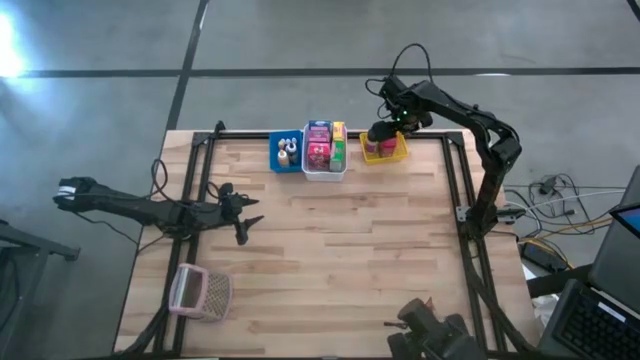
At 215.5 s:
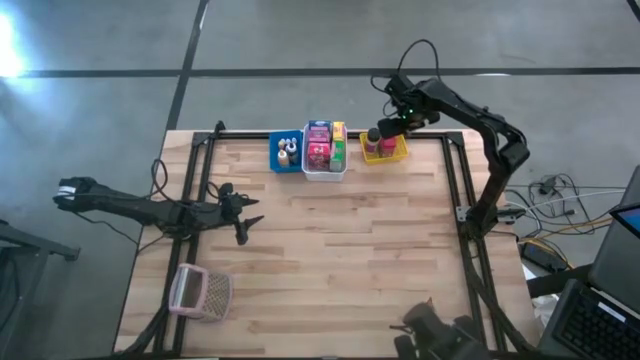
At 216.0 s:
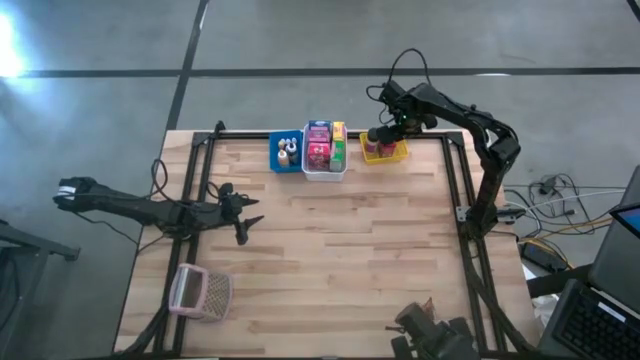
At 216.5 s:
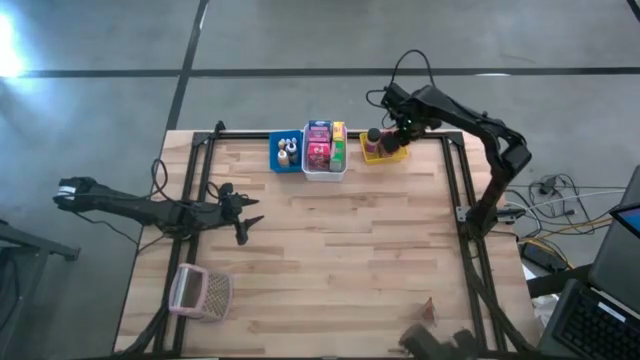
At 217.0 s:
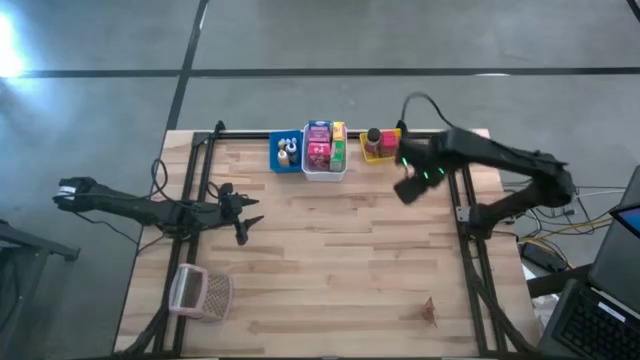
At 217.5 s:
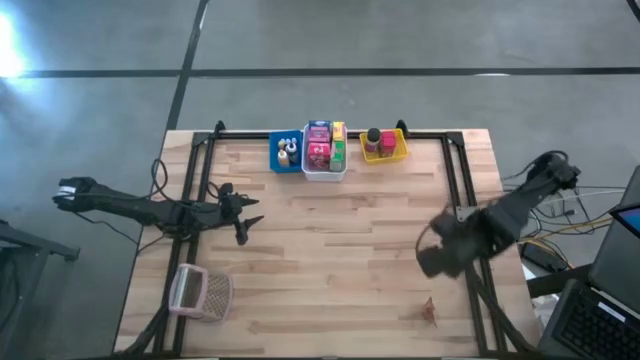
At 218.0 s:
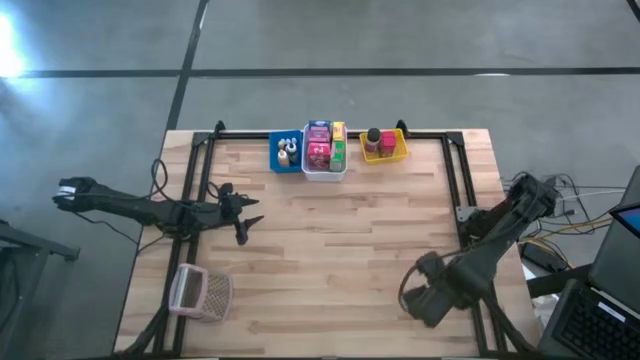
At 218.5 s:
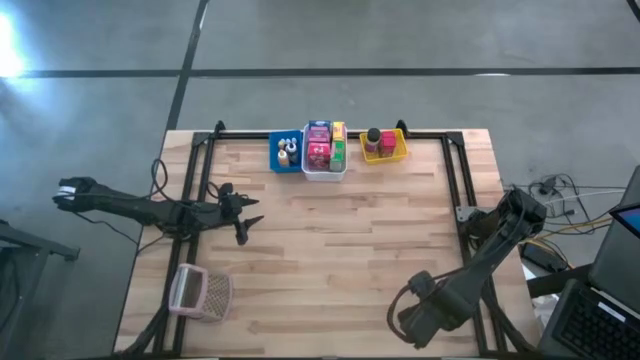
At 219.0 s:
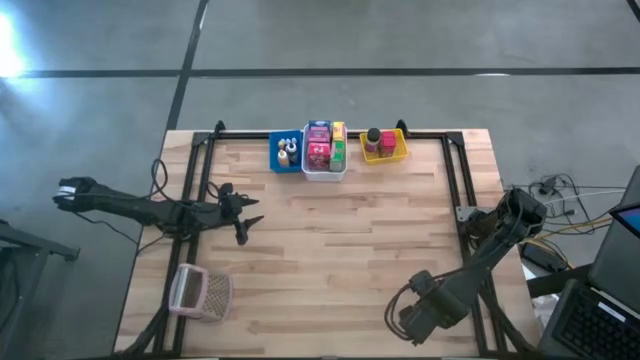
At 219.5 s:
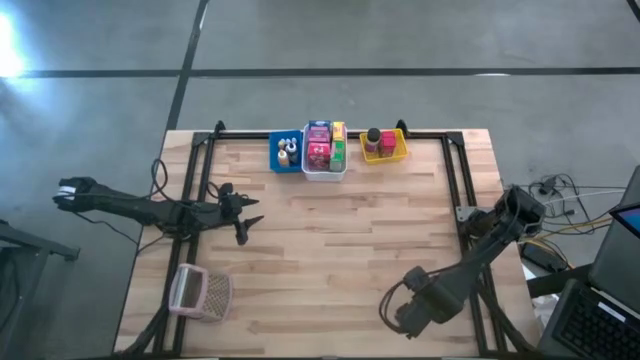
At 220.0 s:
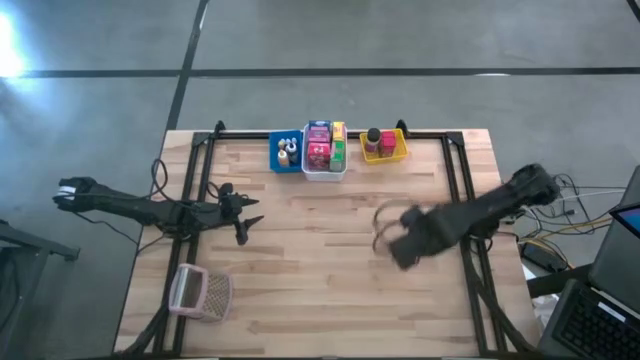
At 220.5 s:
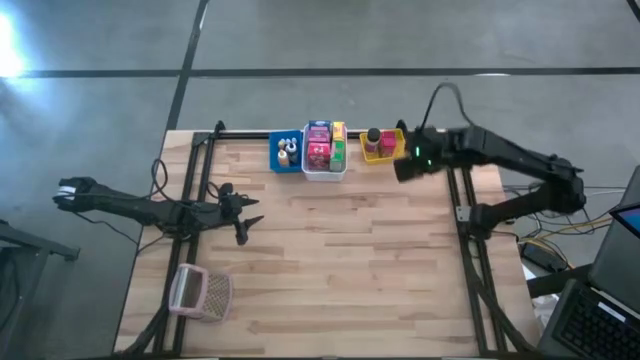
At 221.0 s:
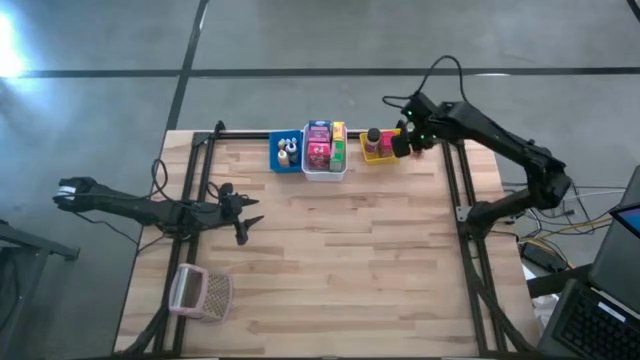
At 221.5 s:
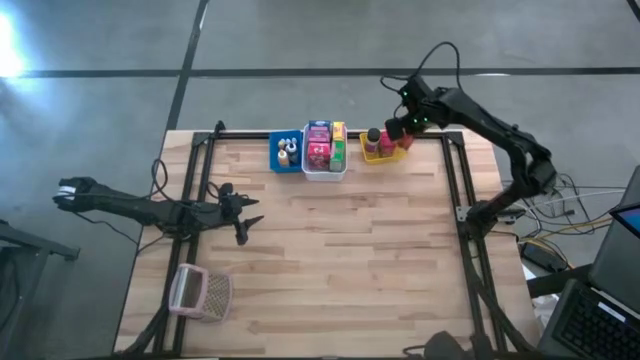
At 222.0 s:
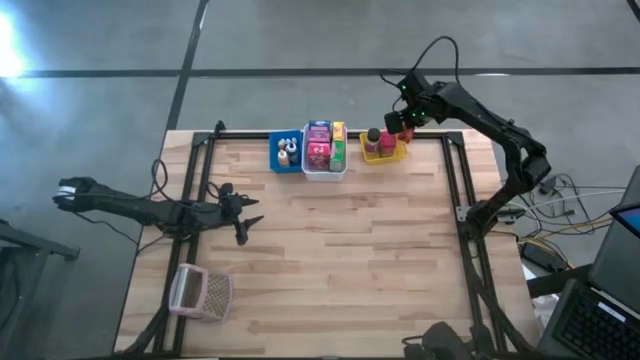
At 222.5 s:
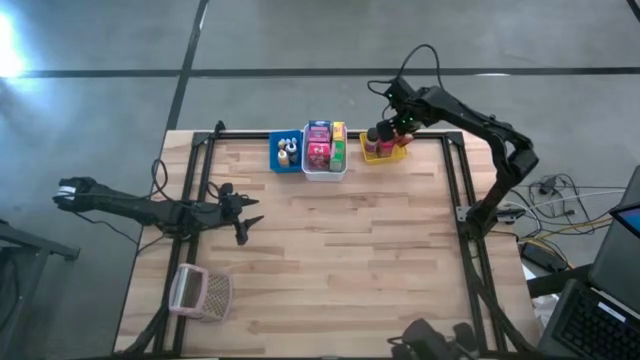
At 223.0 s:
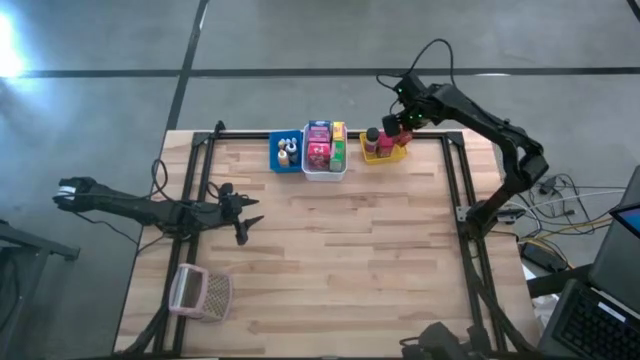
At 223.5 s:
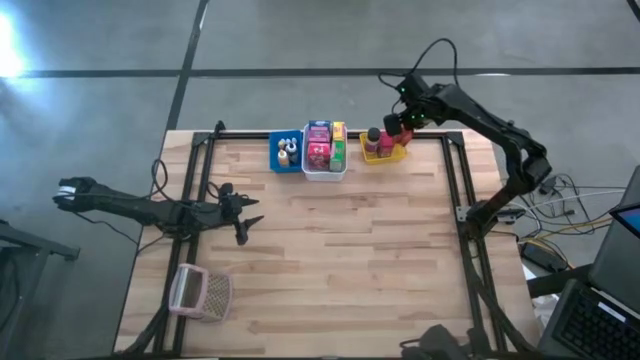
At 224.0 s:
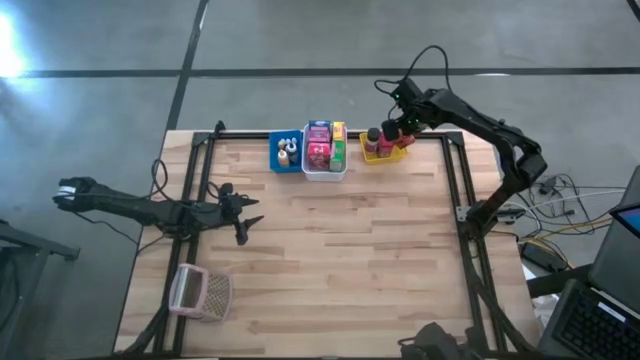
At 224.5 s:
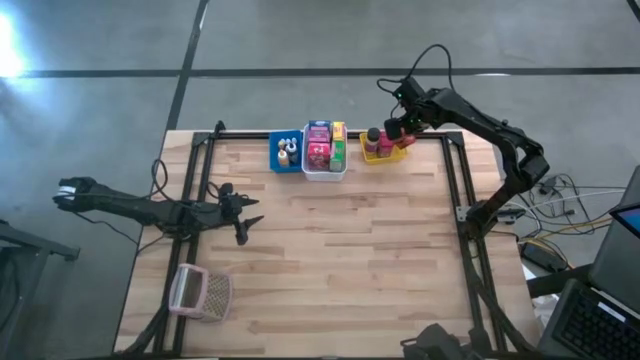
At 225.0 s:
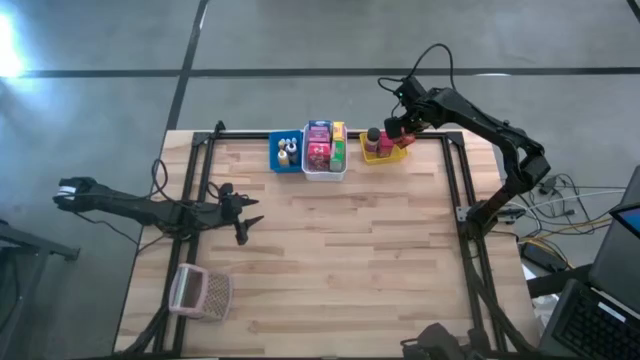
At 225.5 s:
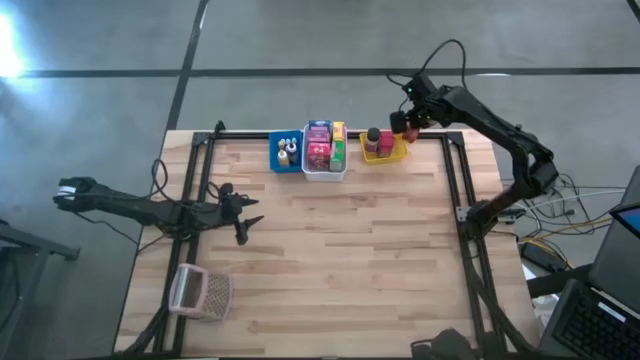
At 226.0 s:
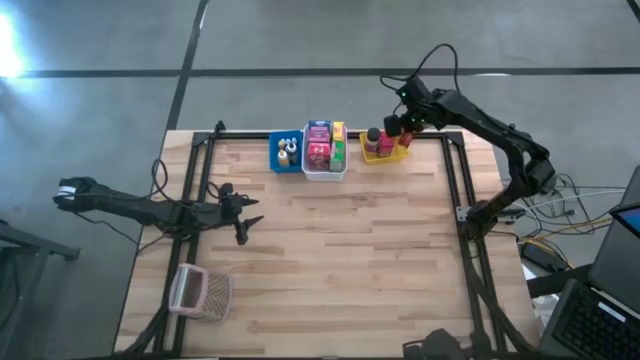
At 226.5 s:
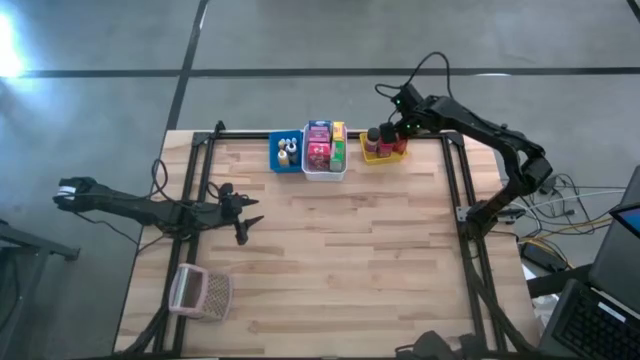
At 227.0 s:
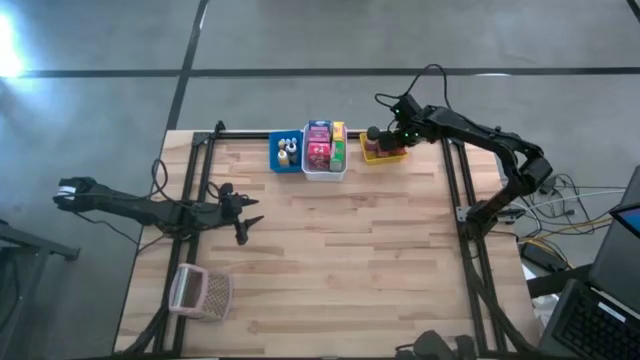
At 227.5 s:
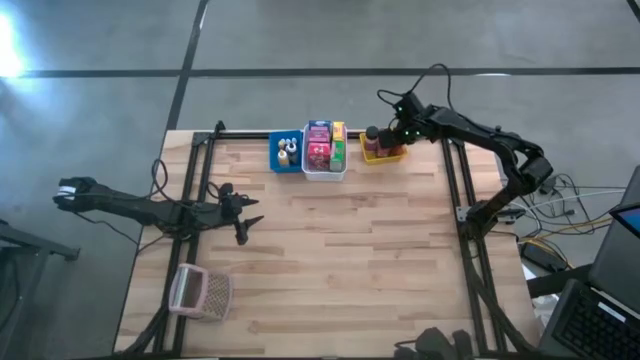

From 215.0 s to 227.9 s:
Task: Pick & Place Kitchen Items
Put the orange spice bag into the yellow bin

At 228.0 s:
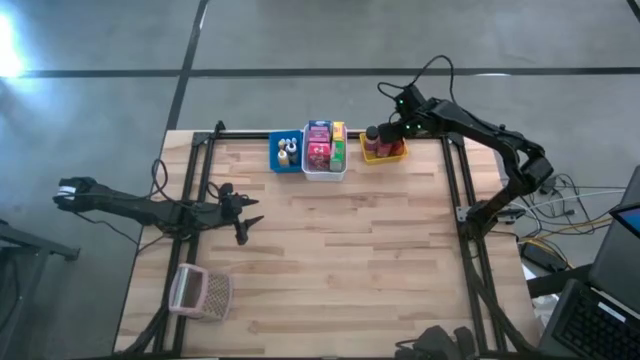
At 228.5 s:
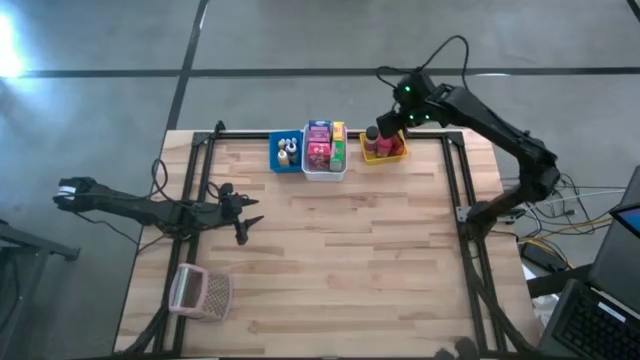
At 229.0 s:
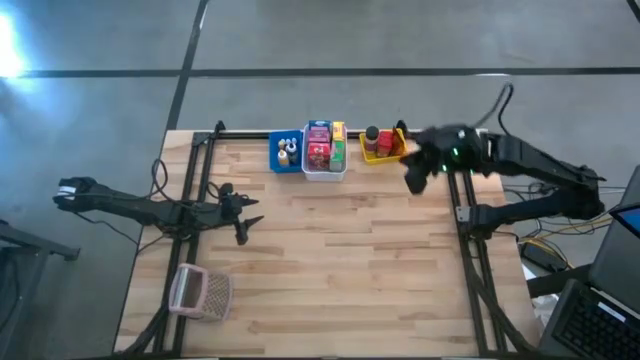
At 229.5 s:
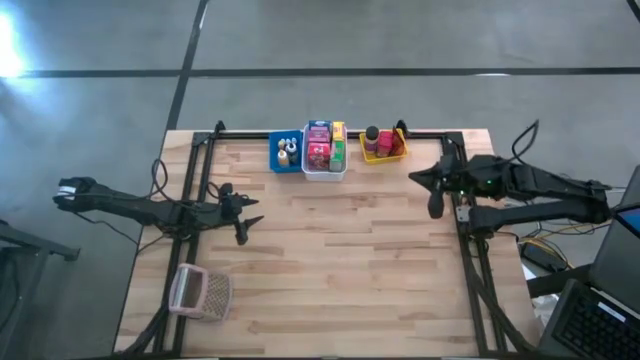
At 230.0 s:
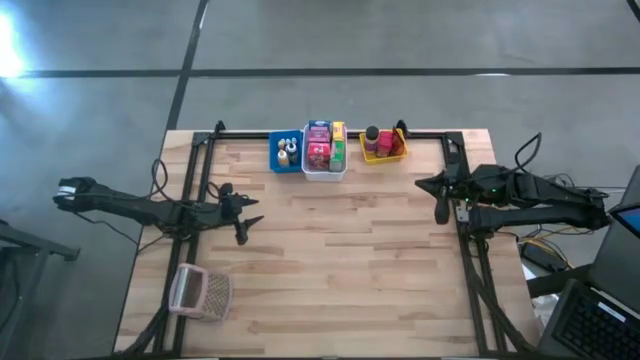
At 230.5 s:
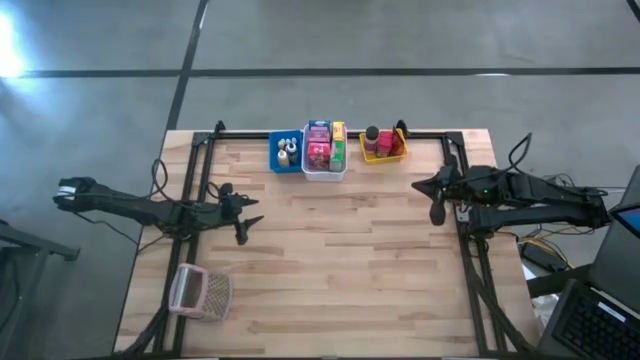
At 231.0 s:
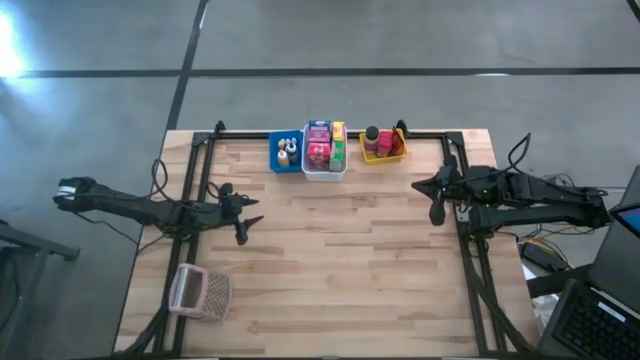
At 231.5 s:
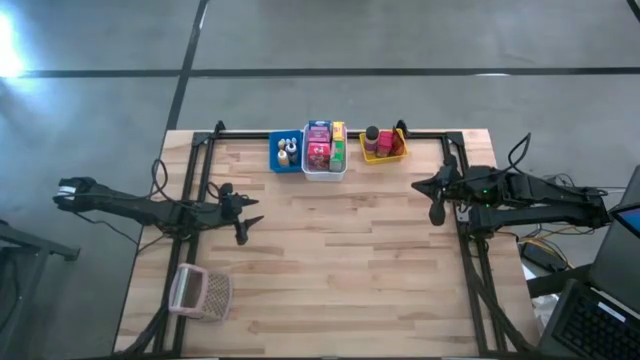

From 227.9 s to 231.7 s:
Return to Home Position

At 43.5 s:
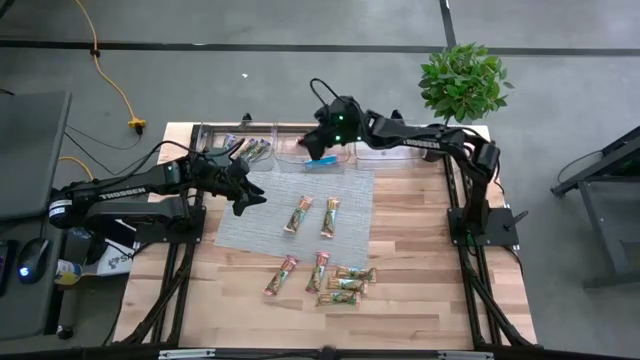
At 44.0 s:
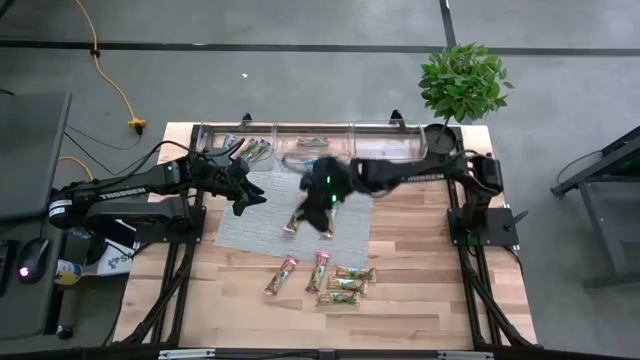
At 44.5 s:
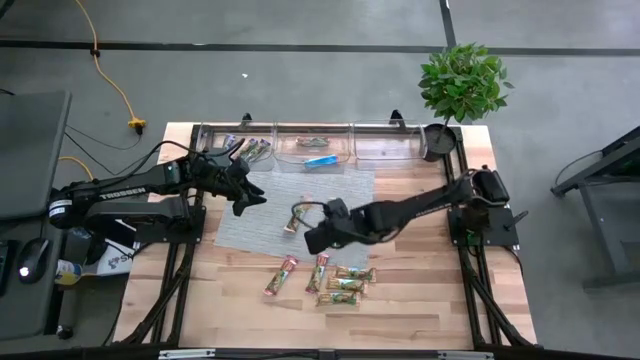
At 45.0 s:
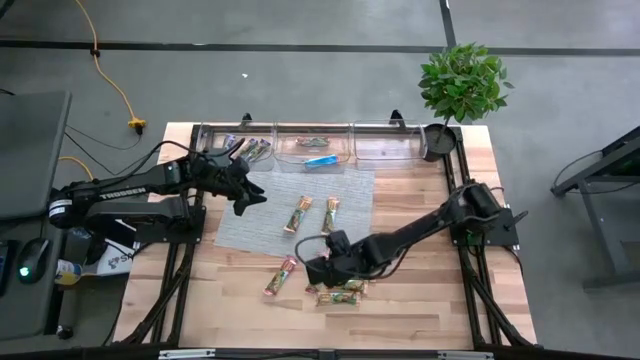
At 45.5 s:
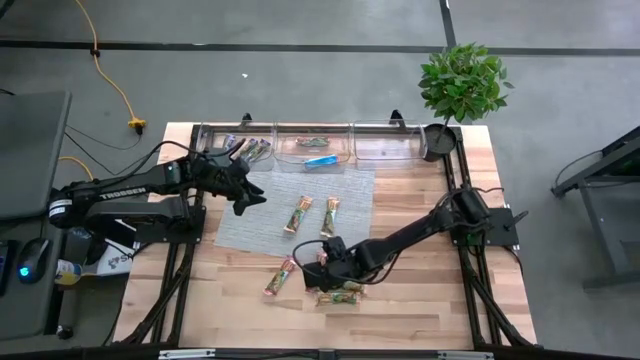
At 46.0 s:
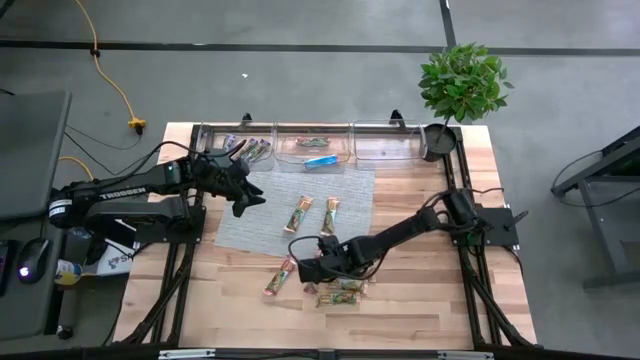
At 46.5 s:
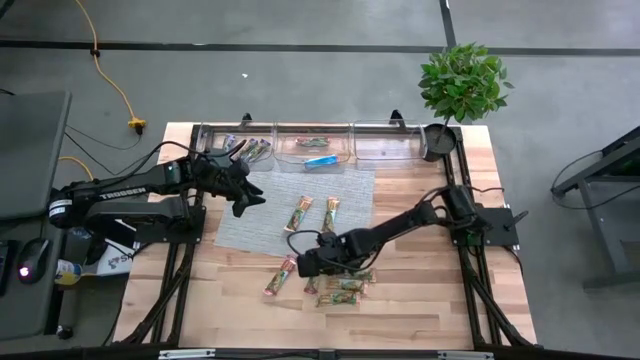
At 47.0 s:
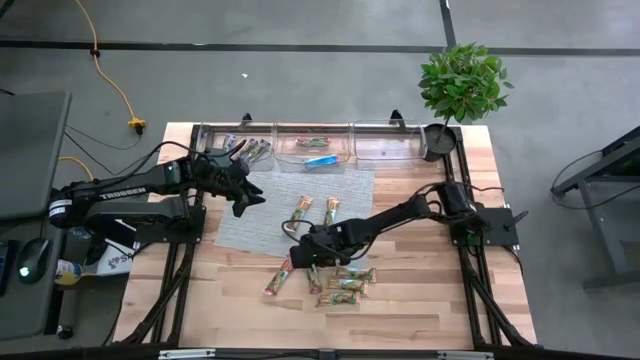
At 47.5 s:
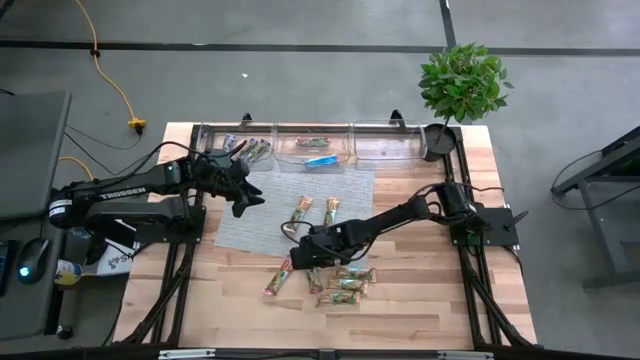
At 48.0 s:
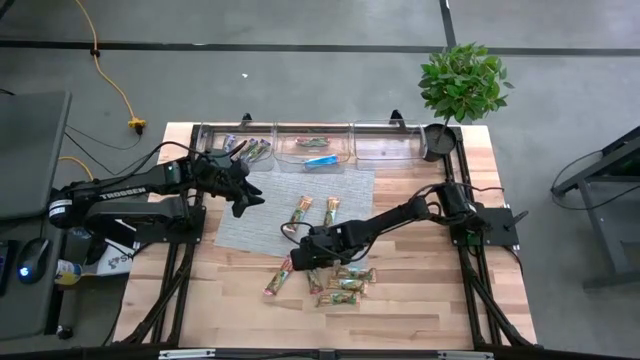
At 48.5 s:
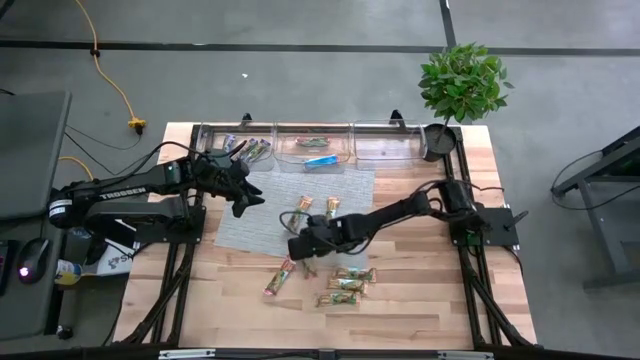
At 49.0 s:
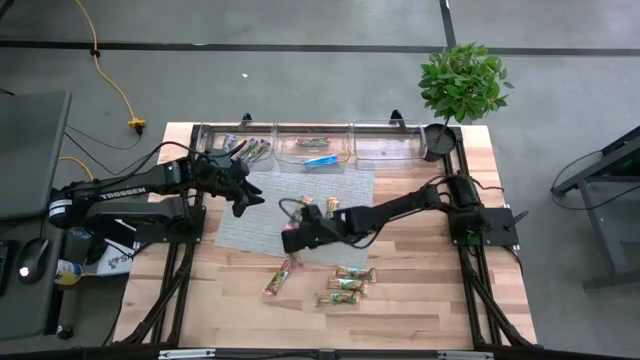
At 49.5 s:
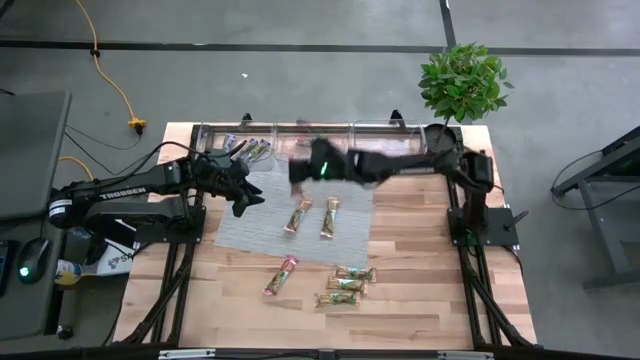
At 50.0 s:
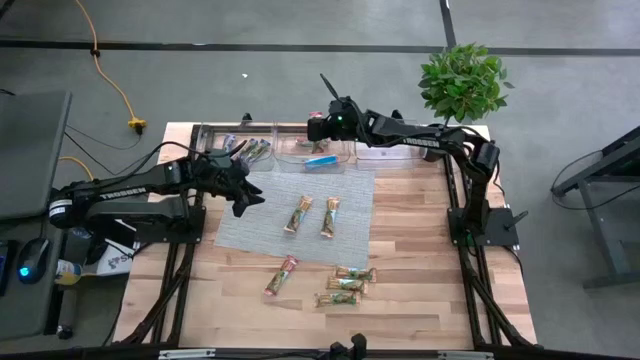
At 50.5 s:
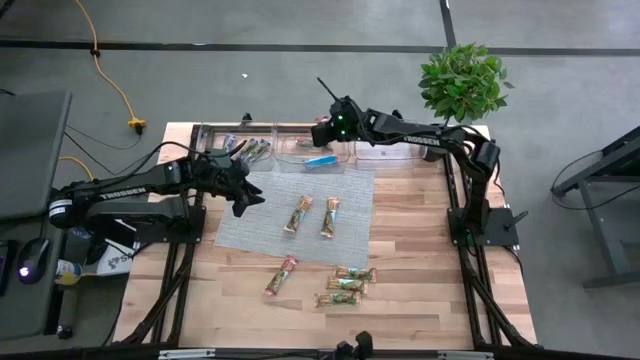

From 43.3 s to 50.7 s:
Task: Pick and place Granola Bars by type
Put the red granola bar into the middle transparent bin
